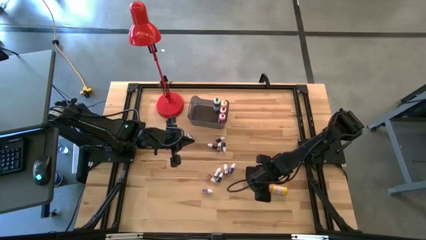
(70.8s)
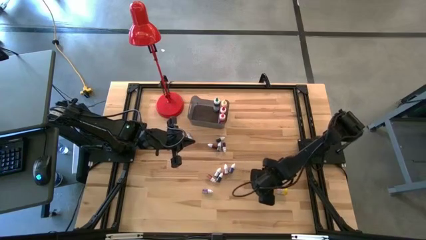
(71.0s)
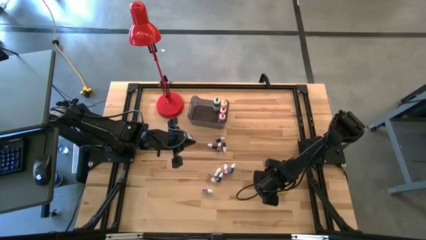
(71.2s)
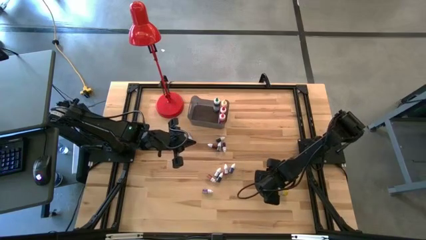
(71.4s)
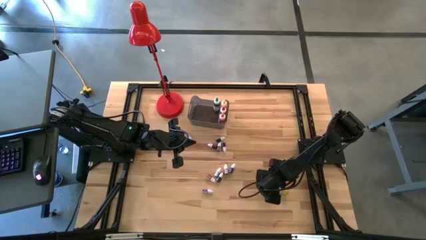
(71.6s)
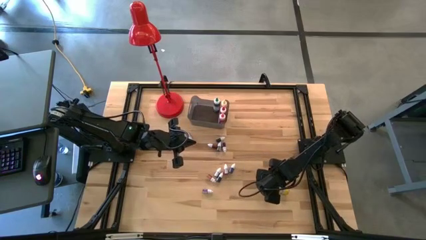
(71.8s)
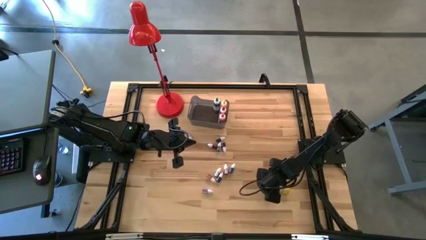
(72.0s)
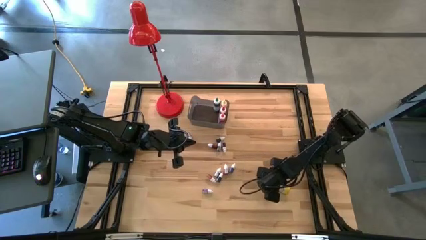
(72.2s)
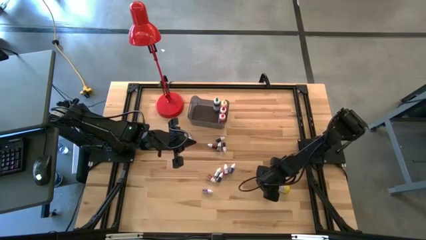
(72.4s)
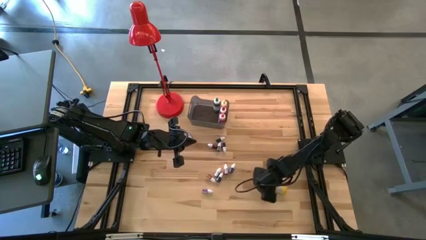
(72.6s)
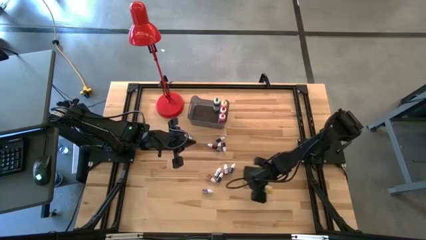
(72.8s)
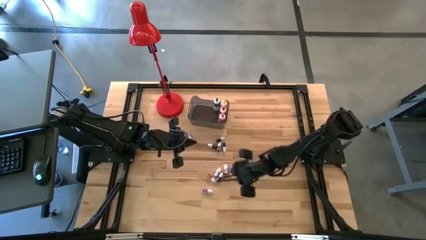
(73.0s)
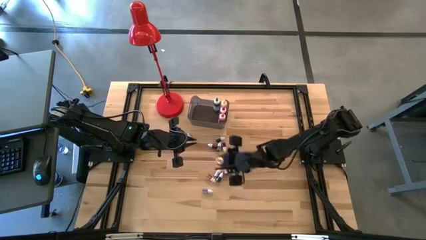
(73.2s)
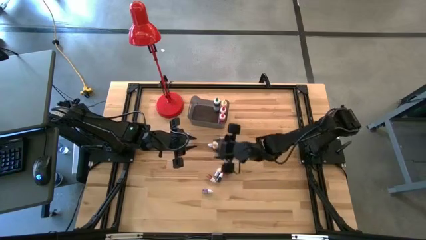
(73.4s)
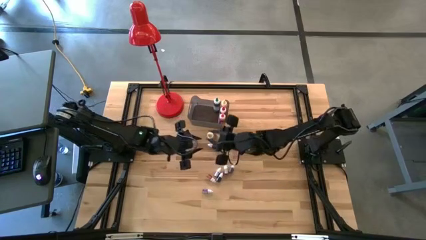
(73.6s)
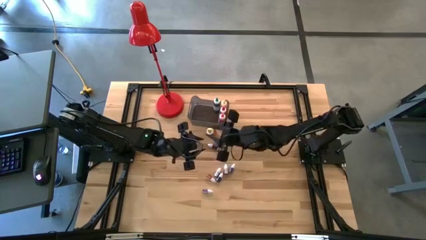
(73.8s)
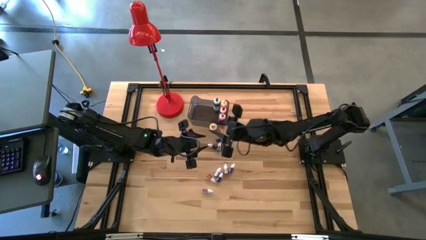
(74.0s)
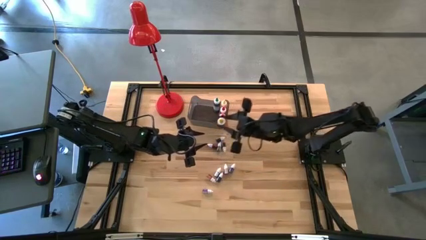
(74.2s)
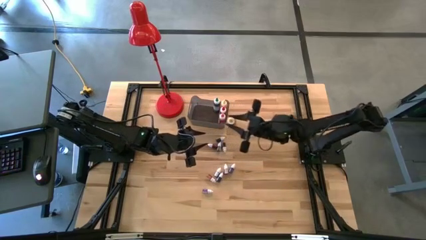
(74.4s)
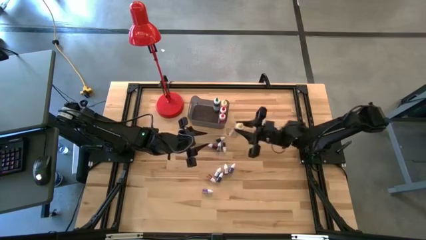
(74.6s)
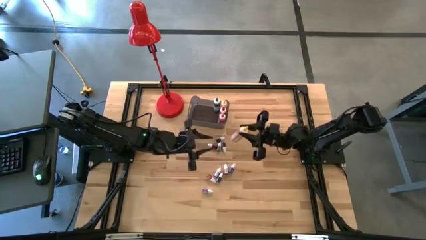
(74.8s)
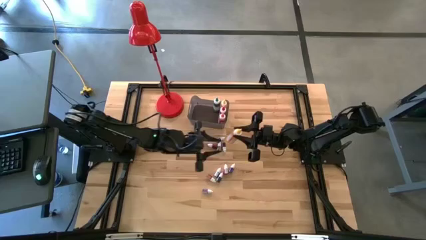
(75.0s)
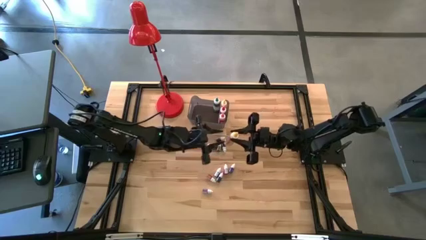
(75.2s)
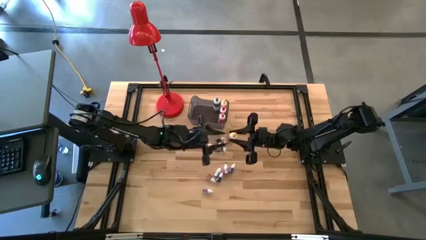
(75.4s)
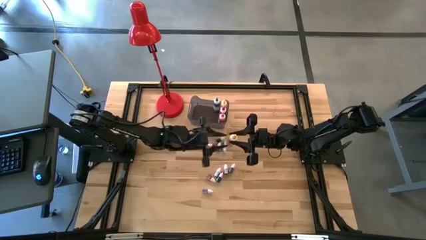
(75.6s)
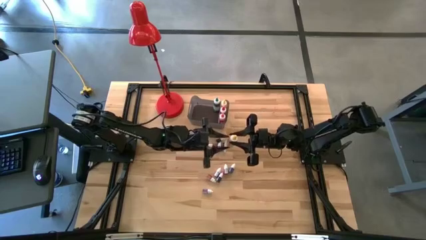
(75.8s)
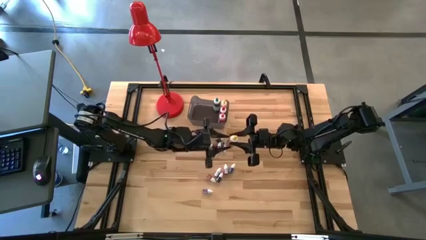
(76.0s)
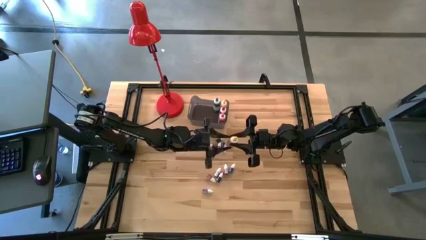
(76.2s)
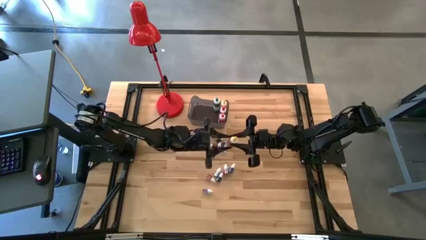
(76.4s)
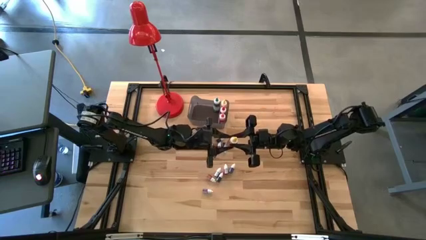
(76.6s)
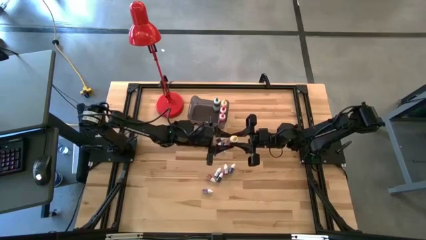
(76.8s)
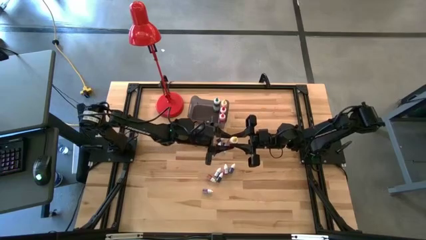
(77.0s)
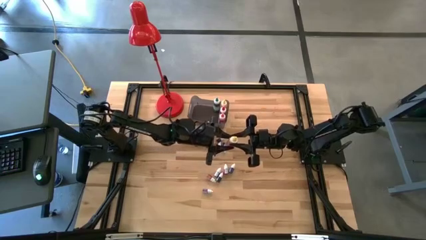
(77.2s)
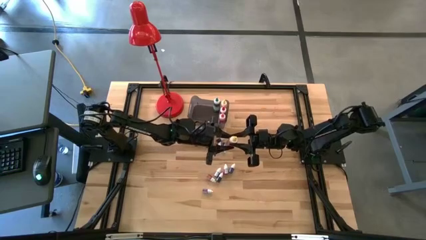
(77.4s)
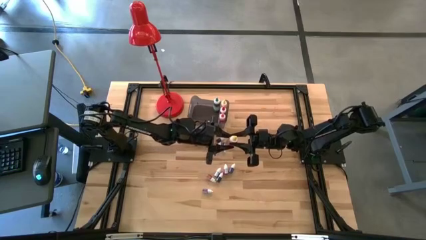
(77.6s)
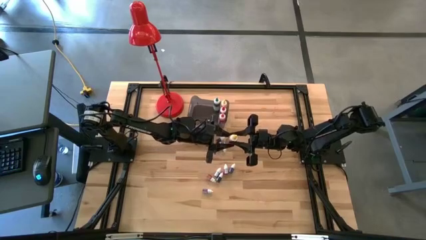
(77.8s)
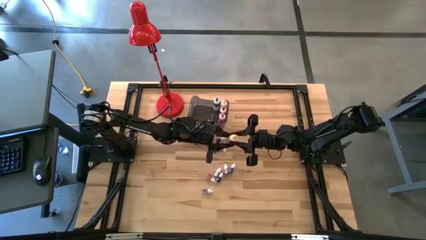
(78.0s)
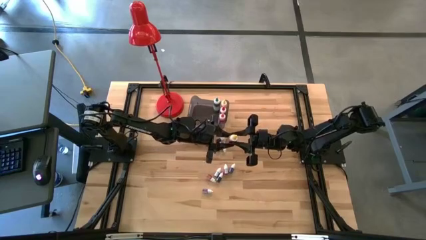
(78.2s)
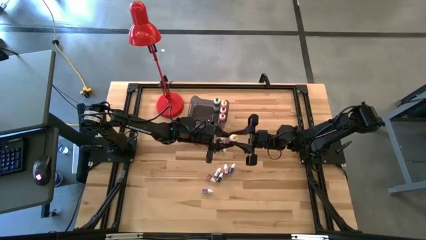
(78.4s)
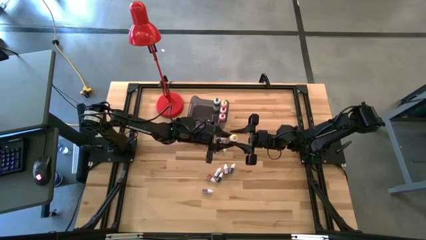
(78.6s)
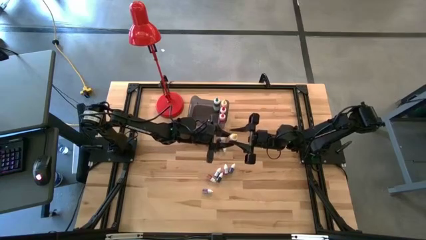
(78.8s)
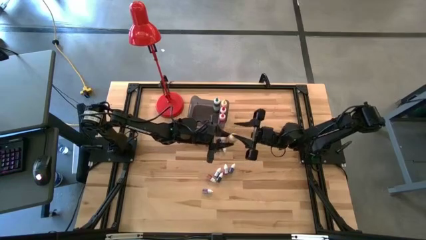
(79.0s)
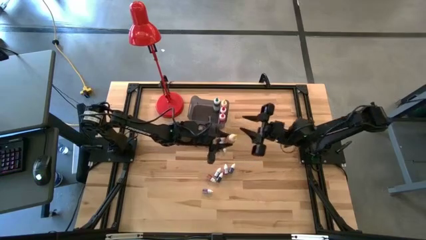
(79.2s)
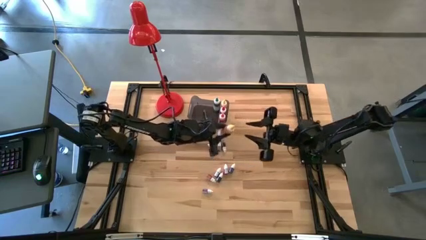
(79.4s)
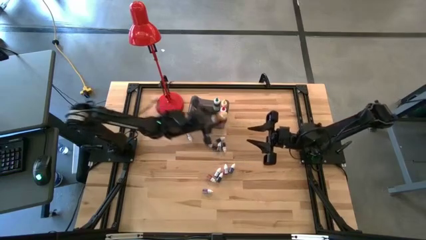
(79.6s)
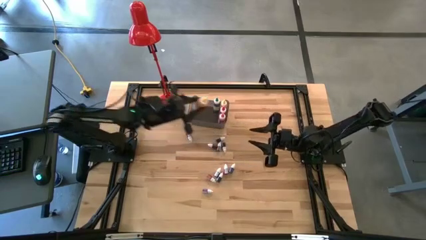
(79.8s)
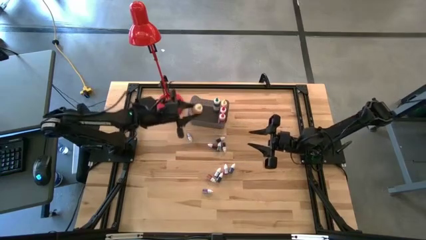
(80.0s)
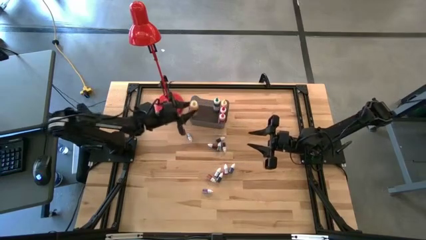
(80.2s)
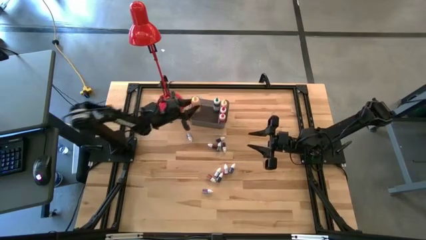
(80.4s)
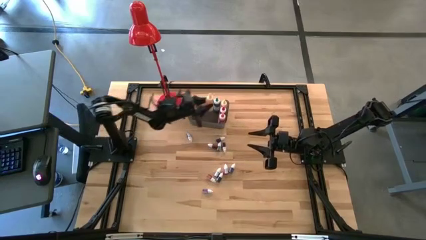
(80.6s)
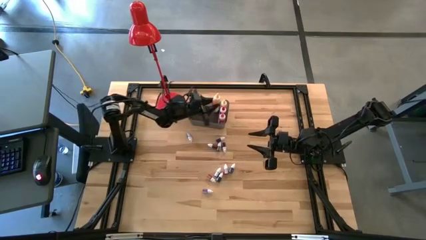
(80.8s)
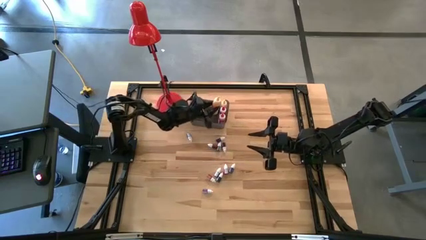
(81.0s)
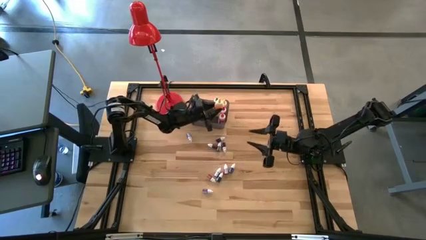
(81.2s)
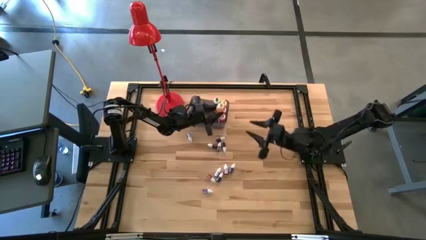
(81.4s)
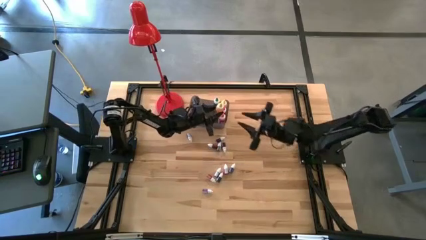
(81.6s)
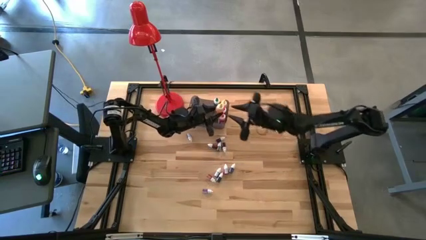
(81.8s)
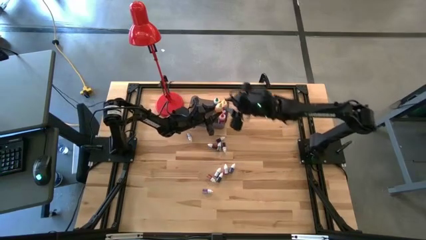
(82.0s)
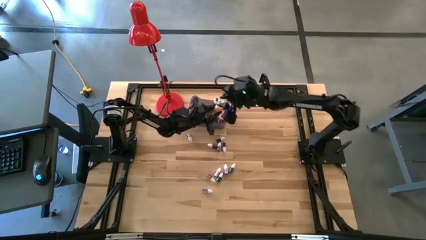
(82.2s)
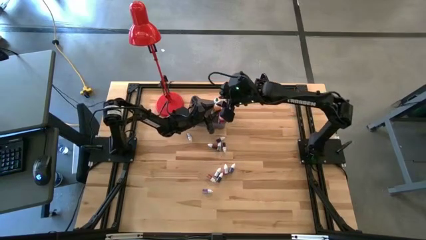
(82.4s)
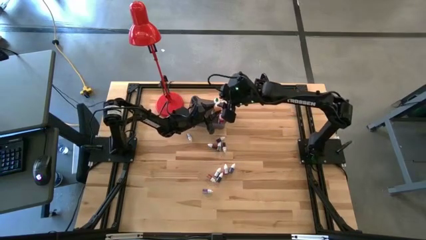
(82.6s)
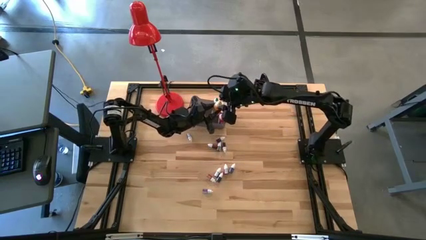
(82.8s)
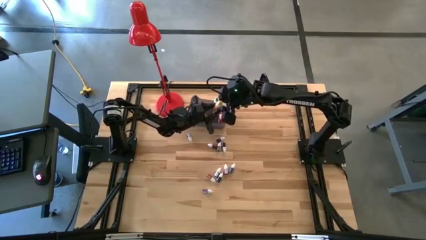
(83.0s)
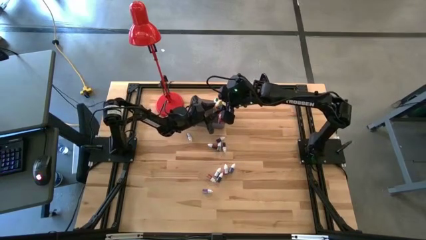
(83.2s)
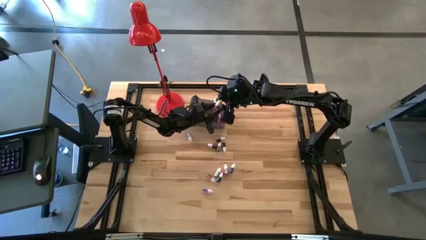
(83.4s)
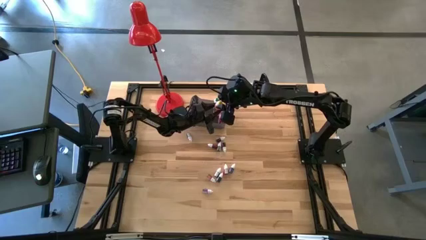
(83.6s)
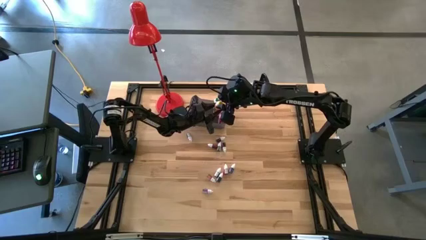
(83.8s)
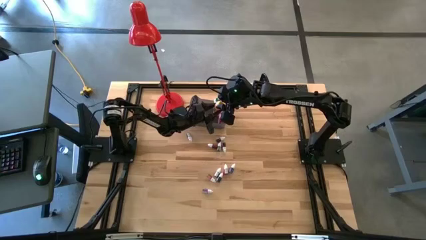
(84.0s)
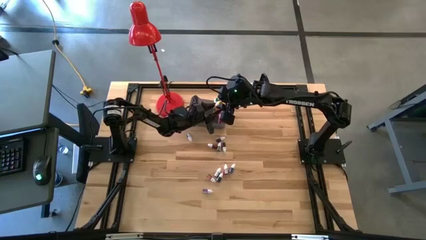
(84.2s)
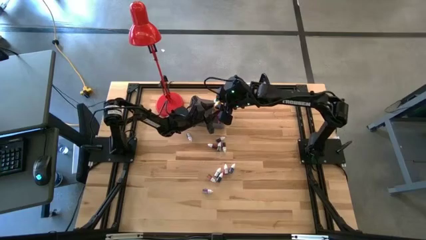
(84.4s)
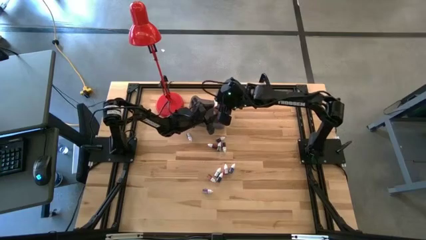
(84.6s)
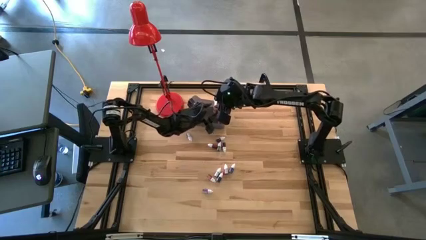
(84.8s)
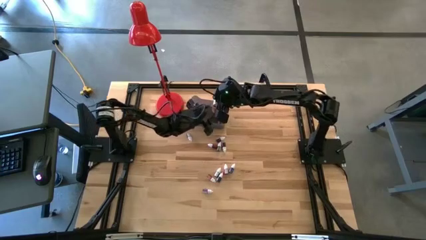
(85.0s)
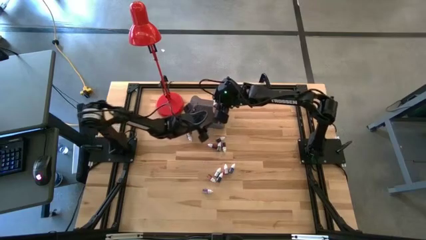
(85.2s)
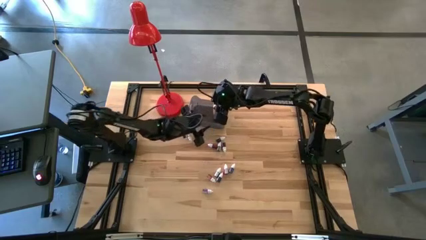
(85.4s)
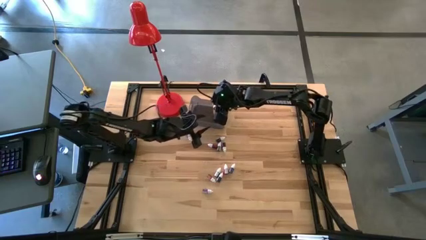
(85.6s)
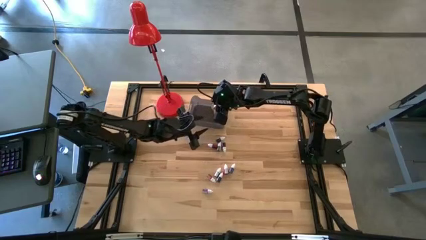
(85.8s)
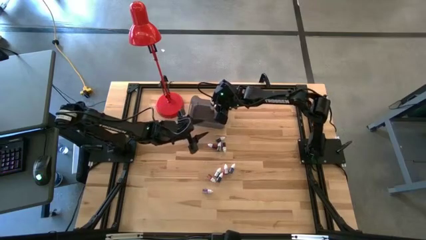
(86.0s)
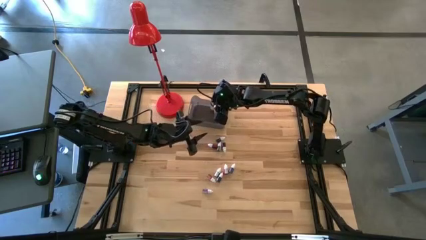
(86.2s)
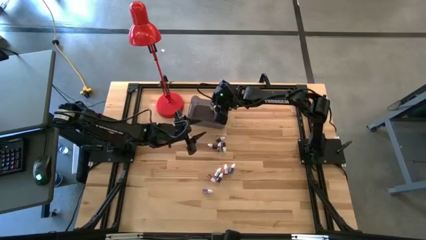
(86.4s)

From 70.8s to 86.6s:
Task: Pick & Place food coloring
Put the large yellow food coloring bottle into the bin

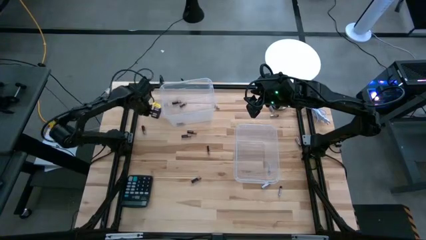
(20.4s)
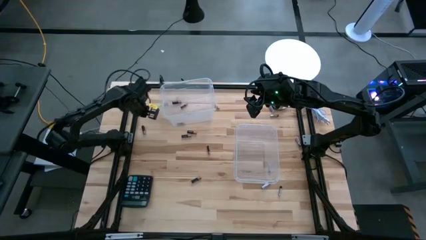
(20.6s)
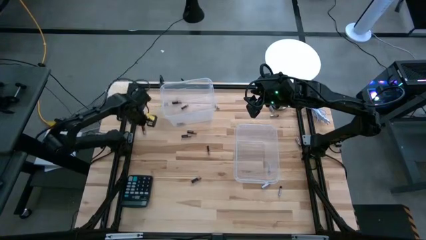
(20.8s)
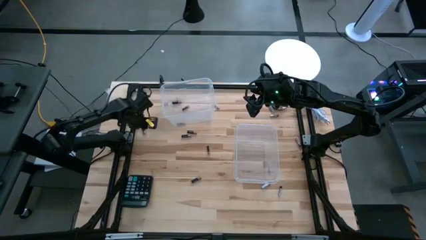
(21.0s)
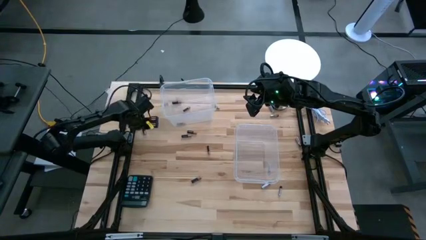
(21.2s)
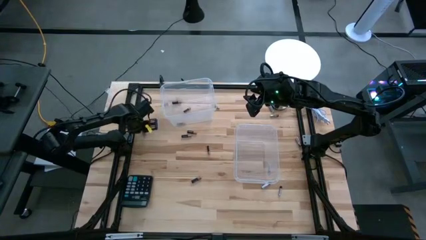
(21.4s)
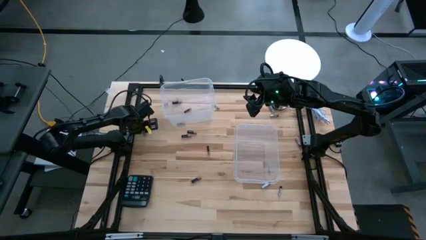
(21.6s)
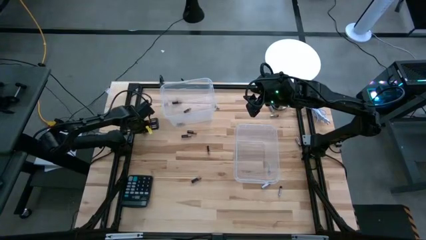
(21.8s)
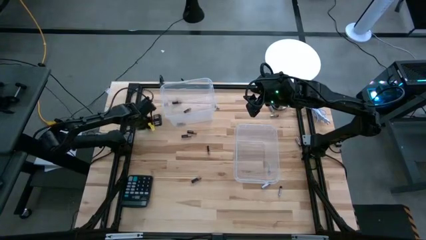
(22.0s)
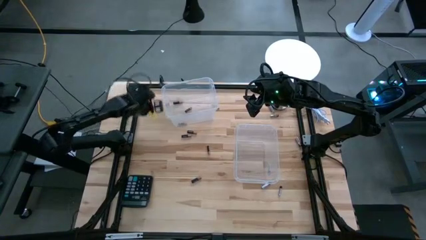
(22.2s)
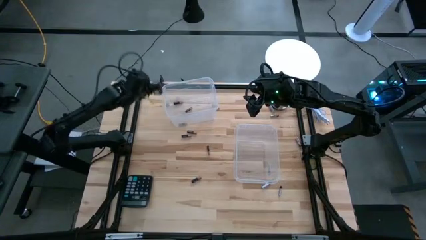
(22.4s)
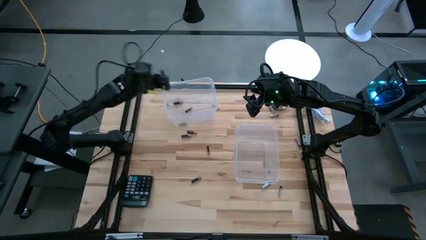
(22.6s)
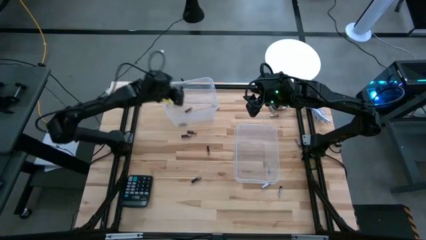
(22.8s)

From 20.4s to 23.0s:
Task: Sort batteries
Put the black battery into the left transparent bin
